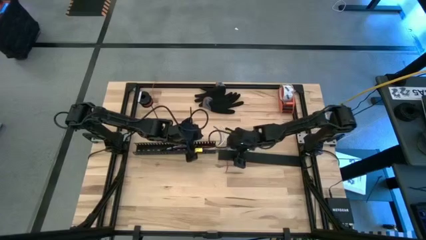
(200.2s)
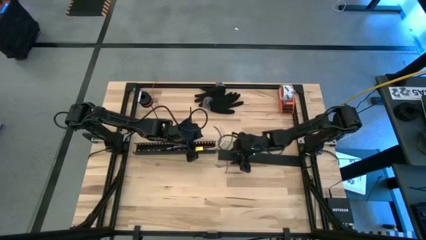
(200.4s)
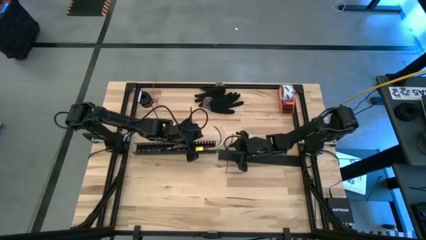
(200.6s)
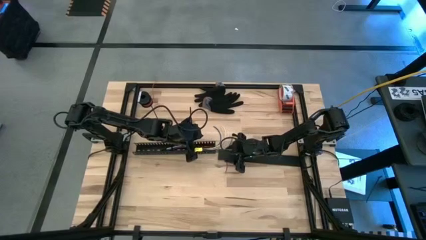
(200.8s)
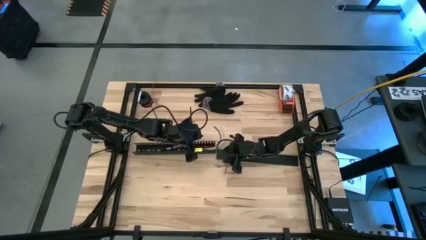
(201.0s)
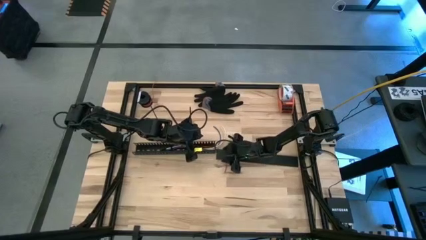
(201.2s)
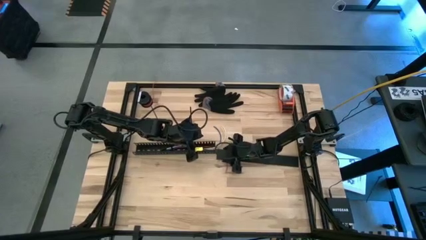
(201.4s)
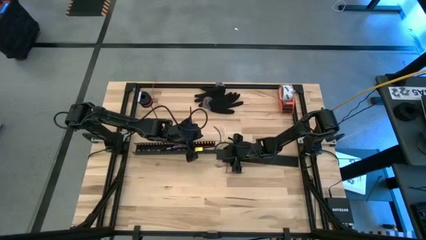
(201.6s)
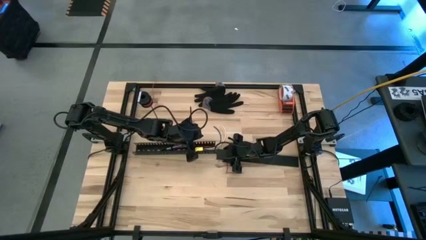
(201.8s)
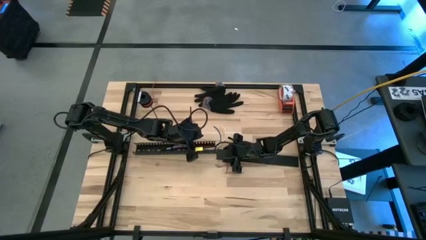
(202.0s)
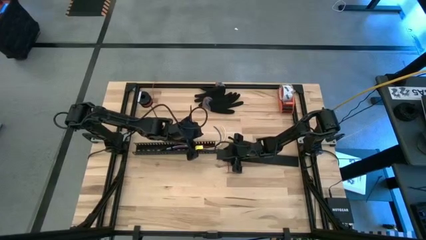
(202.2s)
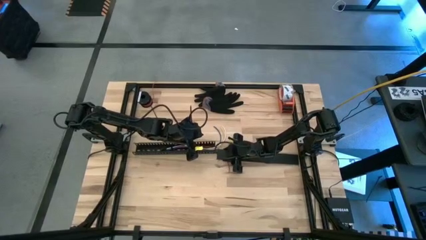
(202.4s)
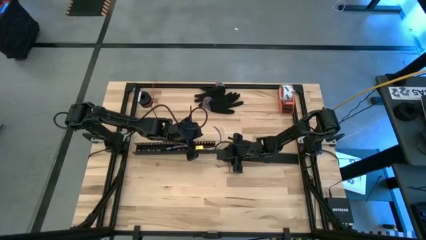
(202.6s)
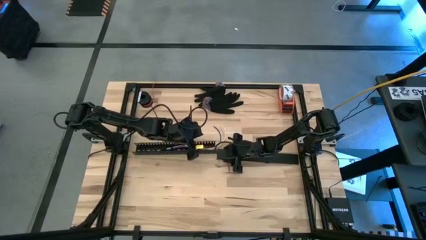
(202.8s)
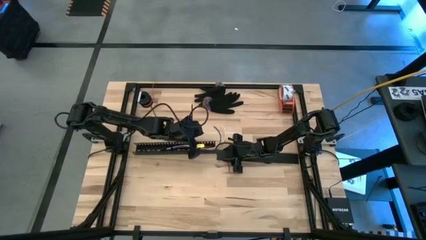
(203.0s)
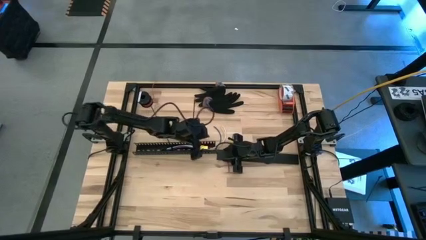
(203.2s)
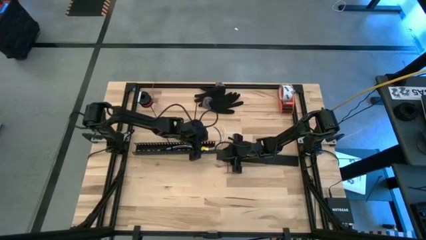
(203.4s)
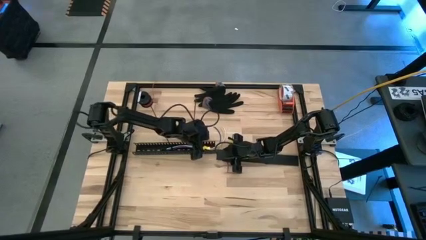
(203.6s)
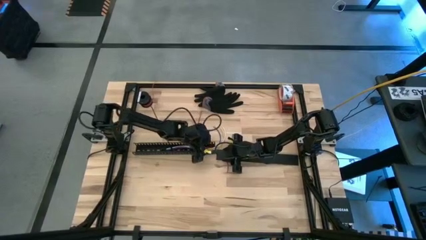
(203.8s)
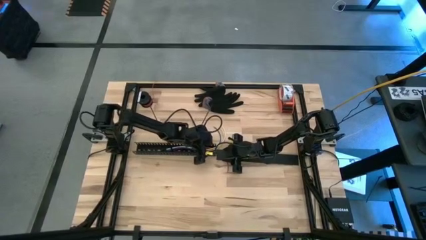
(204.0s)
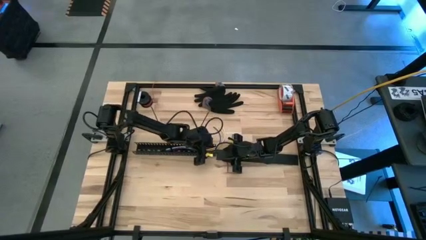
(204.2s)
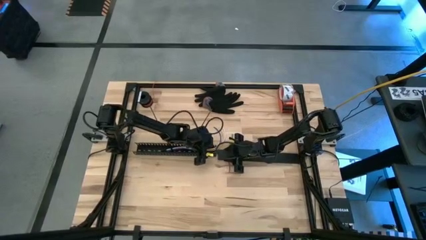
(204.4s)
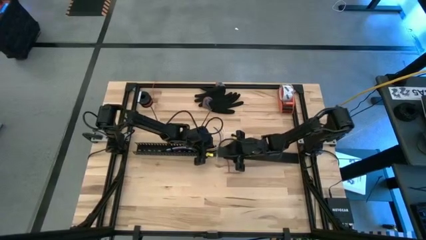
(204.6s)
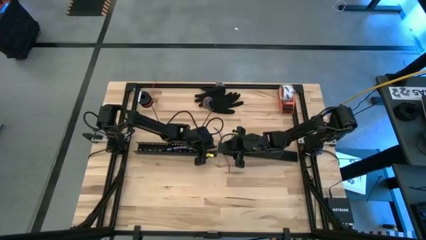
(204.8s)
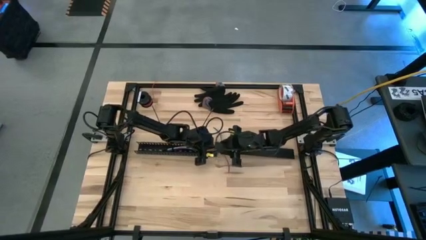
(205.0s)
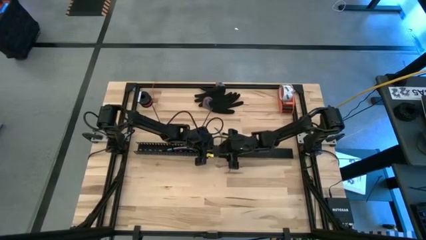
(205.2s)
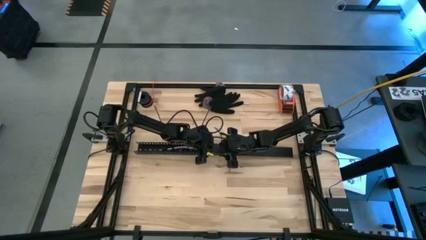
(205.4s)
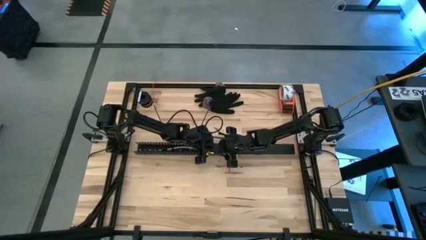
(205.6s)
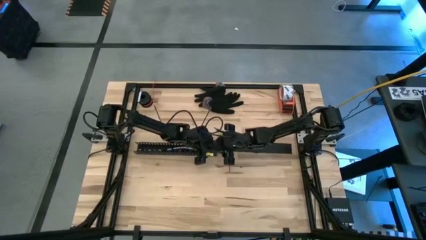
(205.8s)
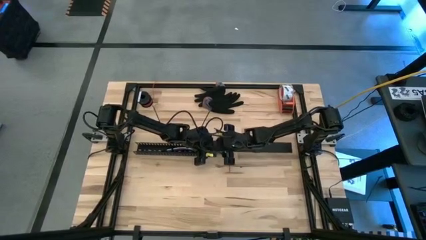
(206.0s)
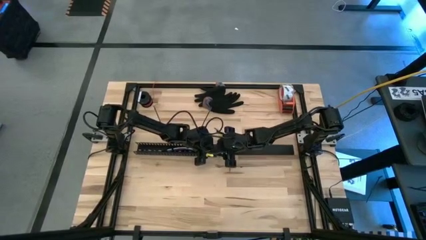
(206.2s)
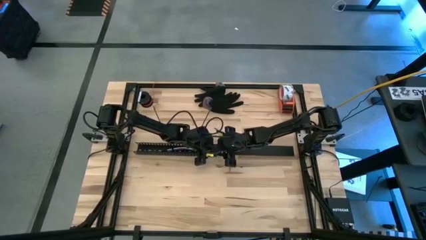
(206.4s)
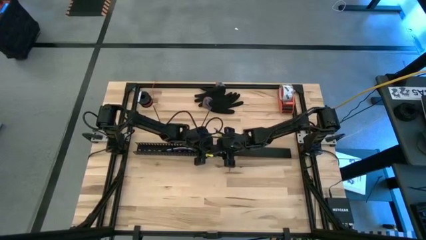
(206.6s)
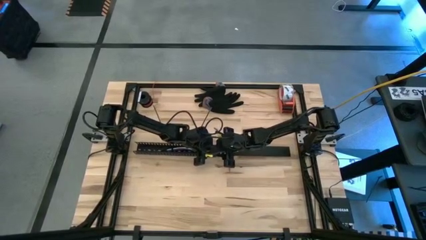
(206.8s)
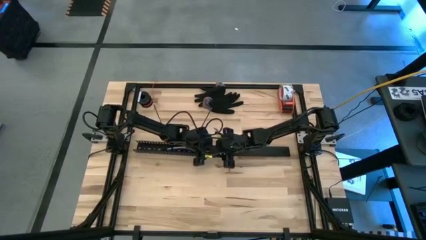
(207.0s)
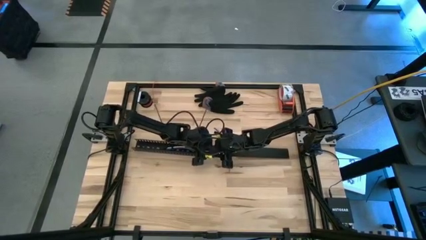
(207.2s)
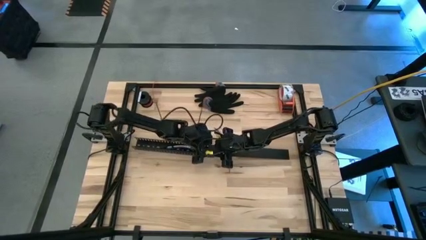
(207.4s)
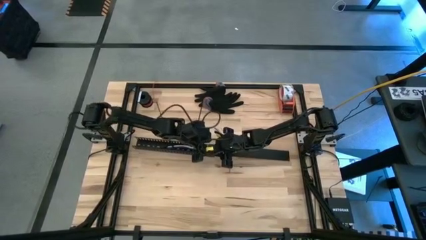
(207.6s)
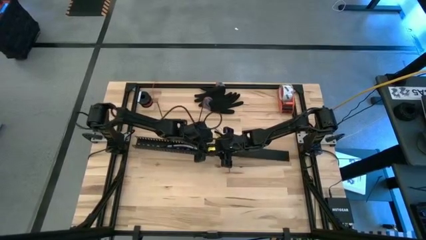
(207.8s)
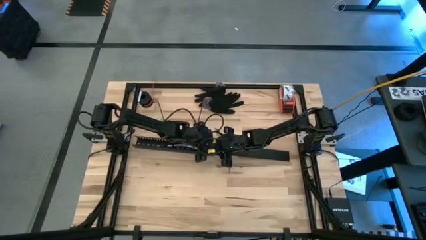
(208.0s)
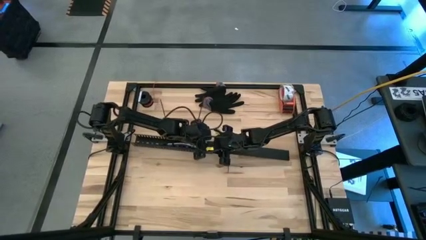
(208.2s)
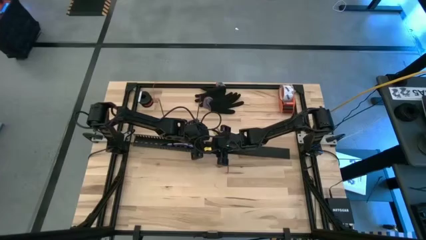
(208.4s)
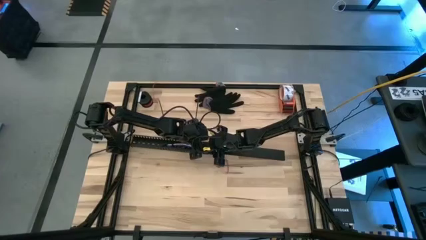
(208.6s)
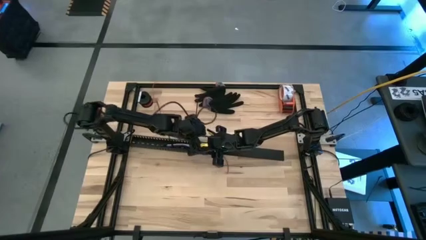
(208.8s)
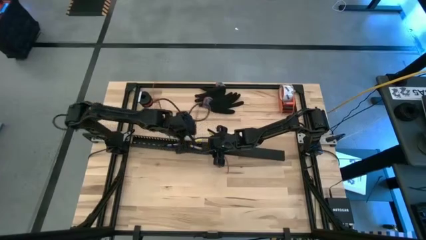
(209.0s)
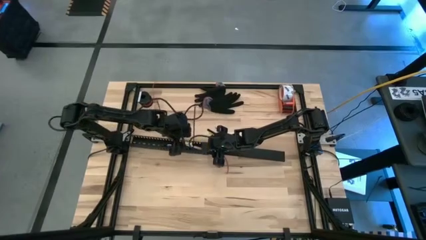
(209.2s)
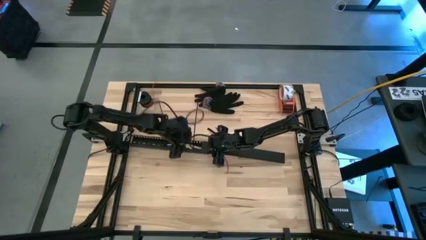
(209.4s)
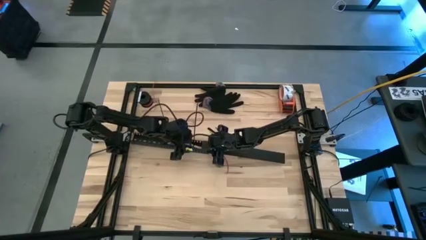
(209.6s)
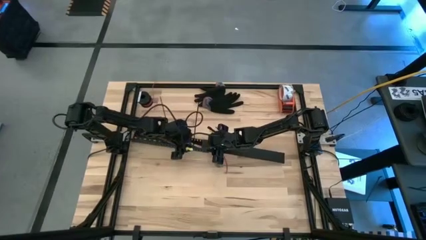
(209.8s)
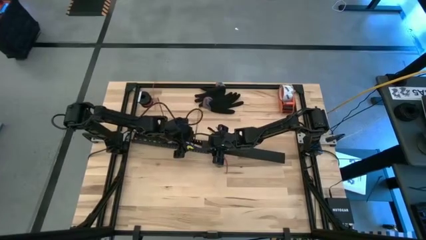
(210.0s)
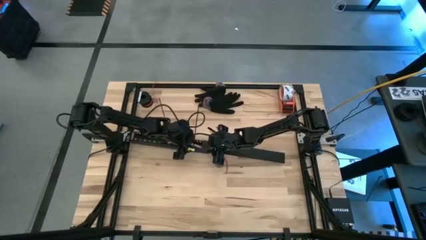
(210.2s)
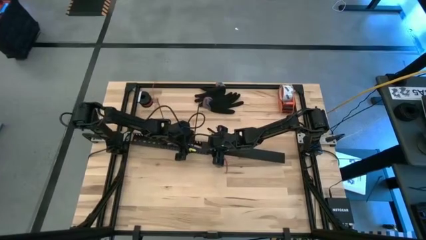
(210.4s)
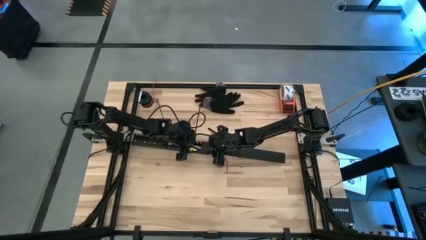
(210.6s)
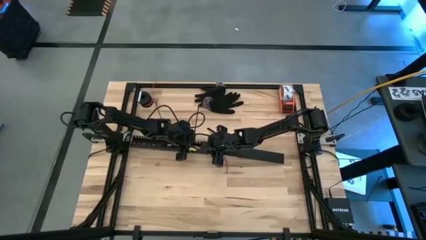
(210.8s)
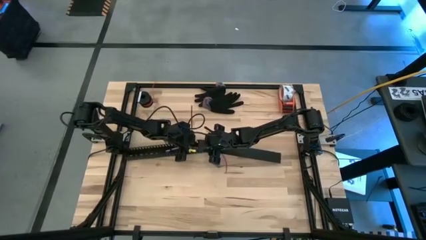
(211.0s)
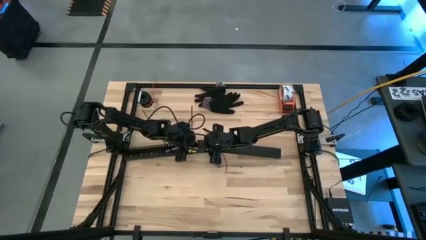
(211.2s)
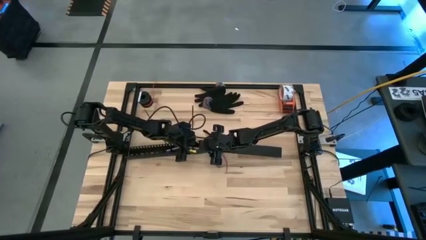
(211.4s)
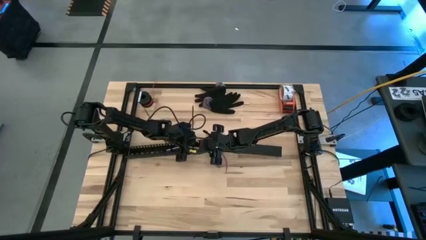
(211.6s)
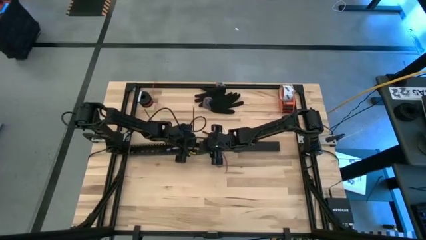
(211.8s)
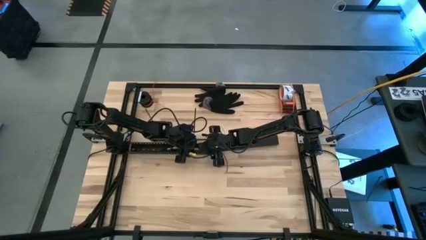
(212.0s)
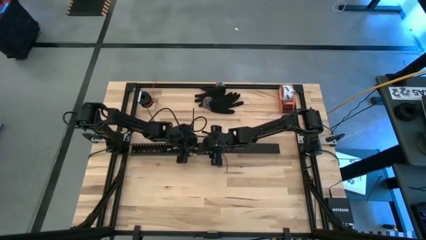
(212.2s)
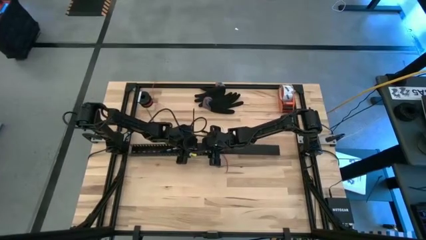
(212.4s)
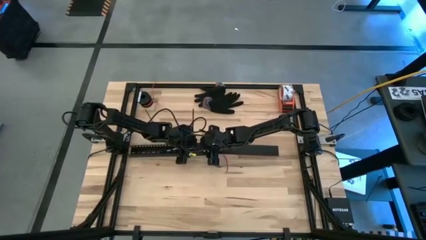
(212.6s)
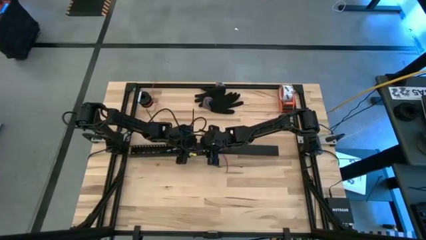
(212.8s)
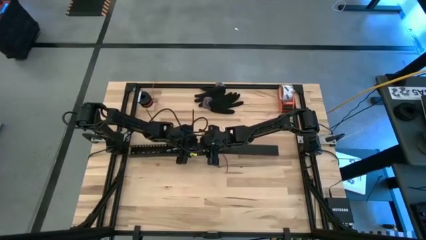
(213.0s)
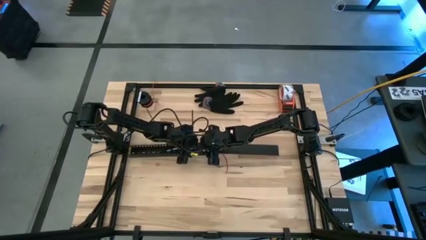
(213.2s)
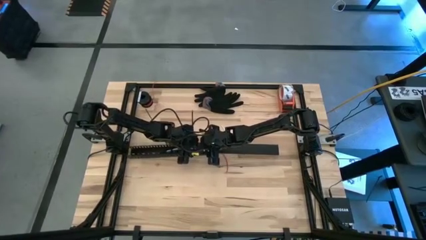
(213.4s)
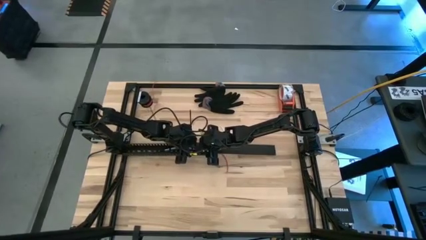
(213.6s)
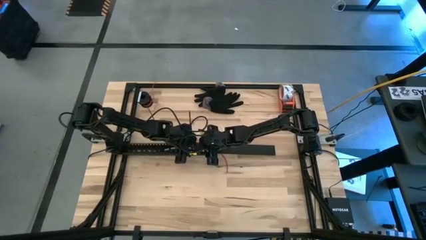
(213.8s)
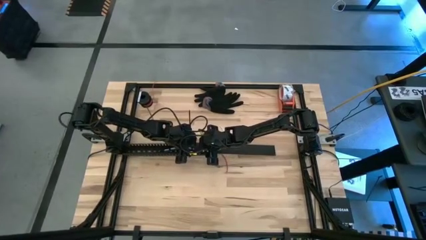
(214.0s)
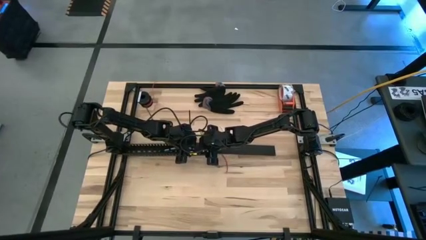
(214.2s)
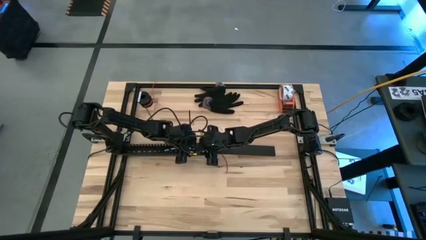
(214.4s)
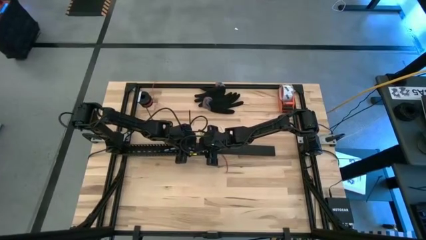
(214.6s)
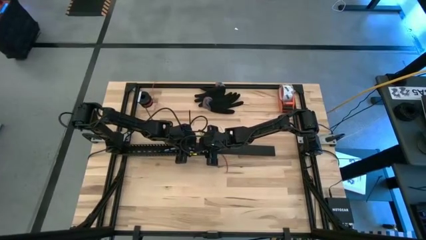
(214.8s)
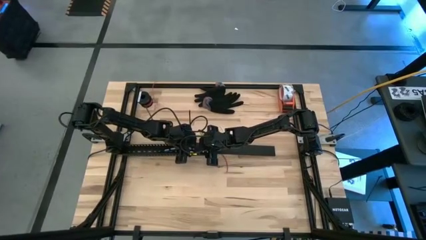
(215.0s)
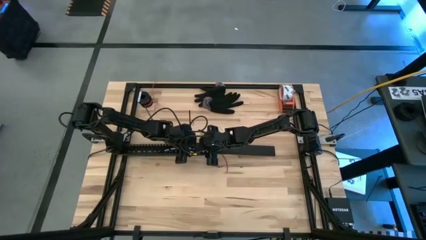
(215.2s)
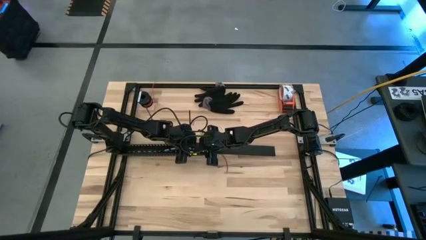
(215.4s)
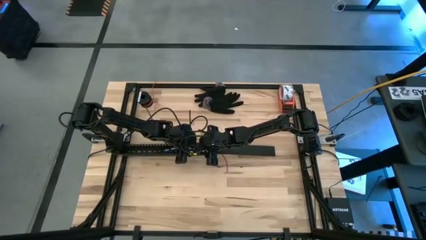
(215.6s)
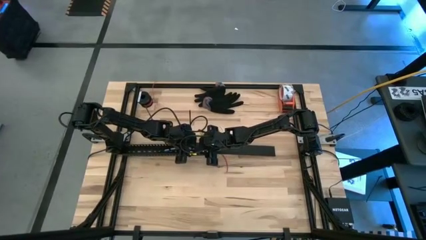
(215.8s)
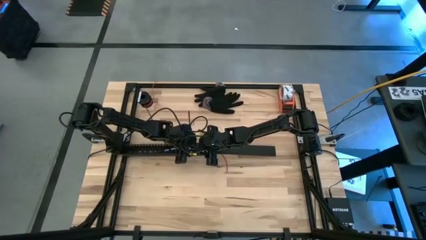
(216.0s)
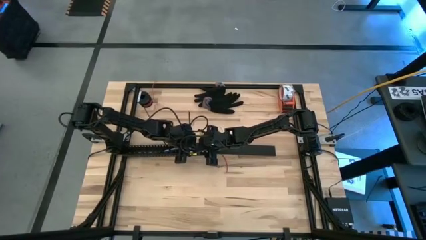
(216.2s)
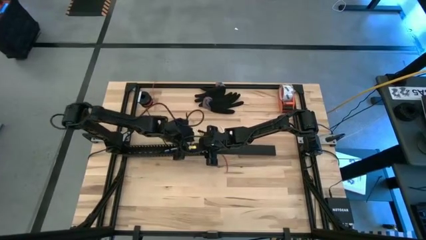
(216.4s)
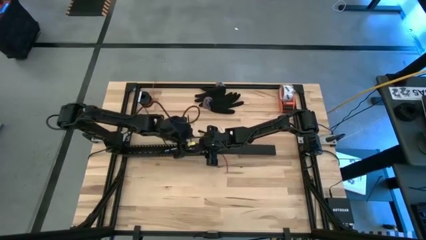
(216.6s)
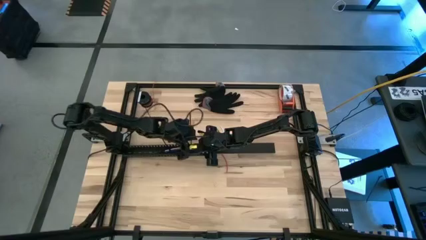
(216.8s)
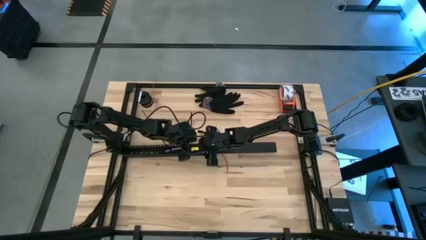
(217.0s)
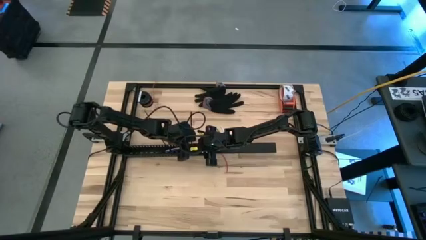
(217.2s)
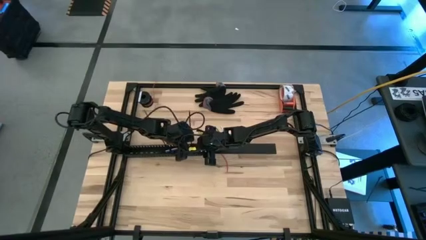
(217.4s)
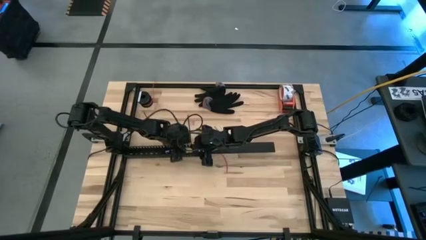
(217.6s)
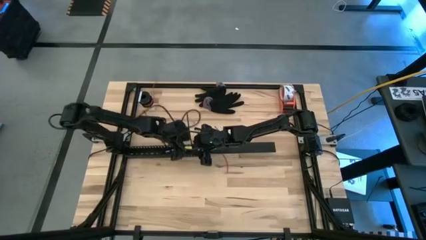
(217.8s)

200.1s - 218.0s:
Task: Ziptie cables
Close the black cable duct lid
